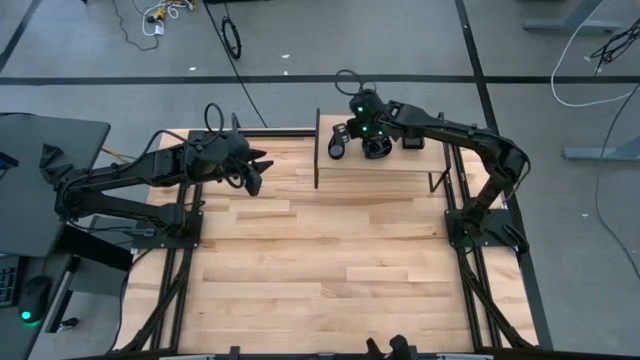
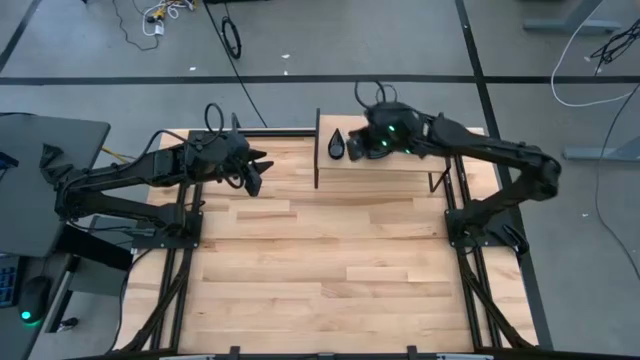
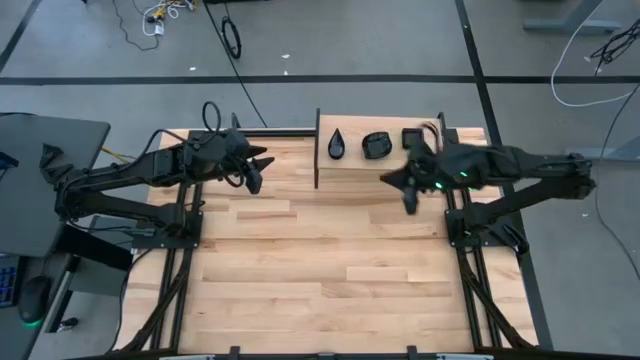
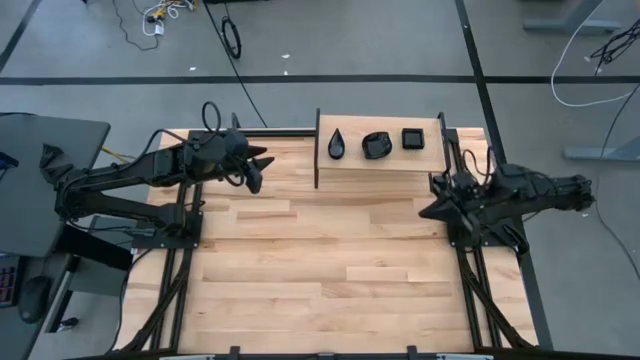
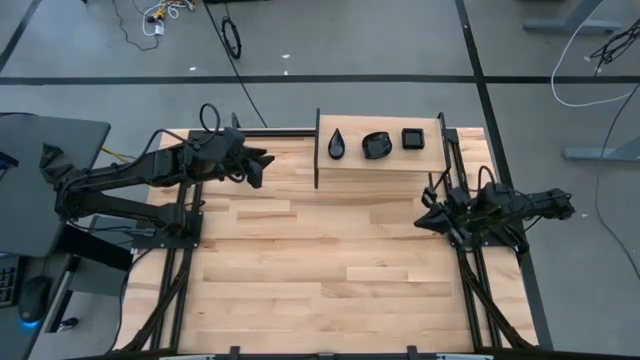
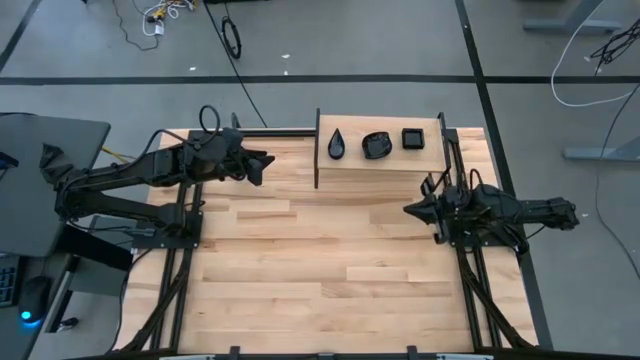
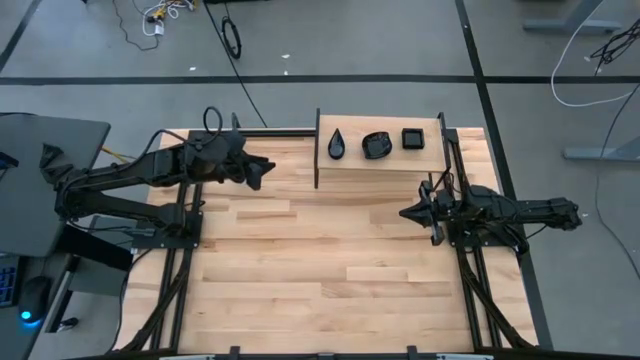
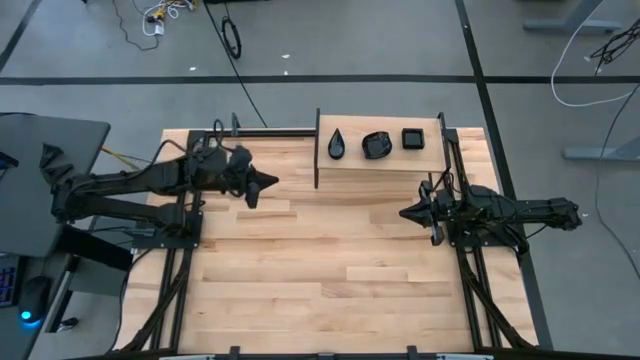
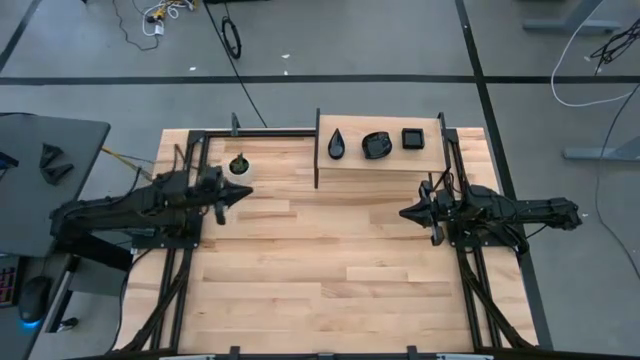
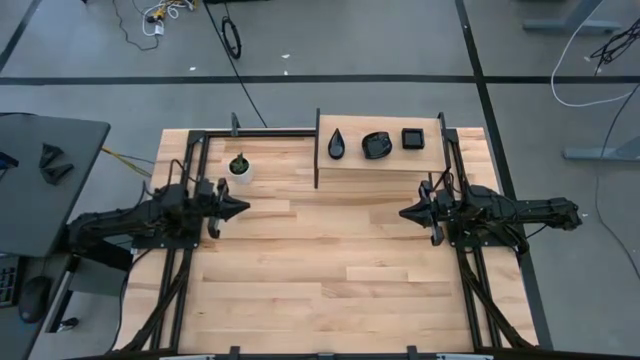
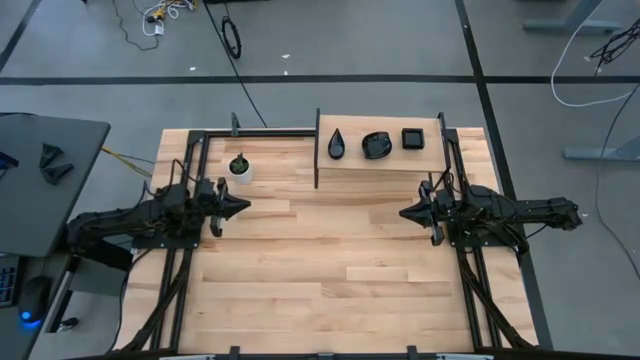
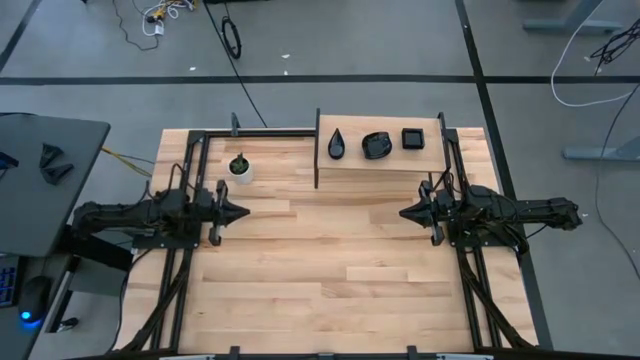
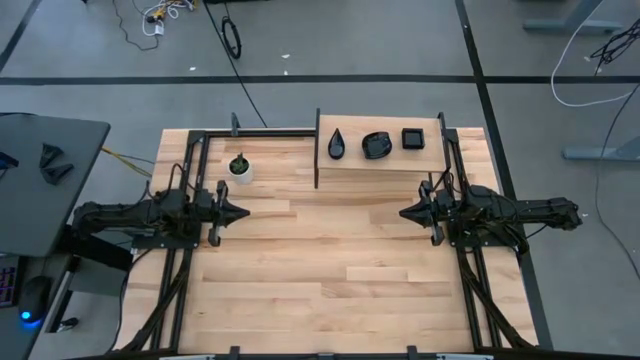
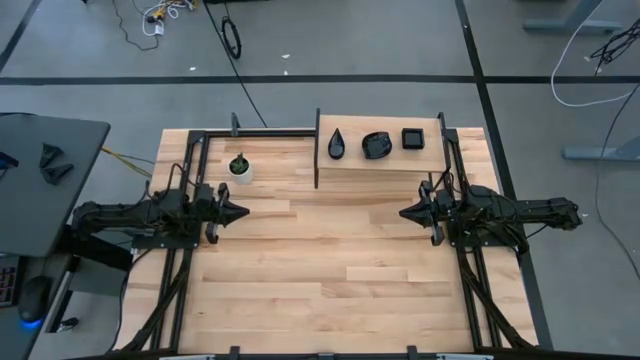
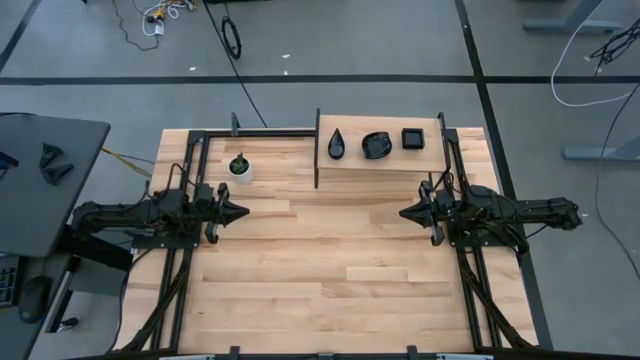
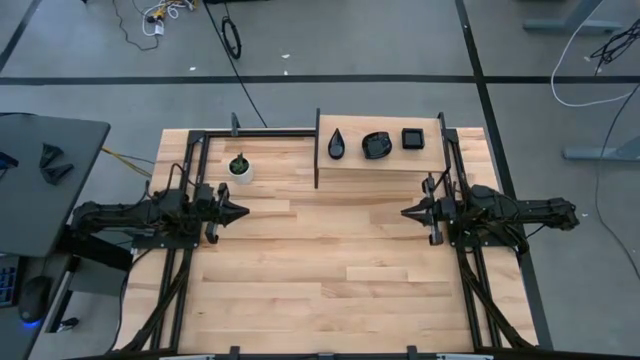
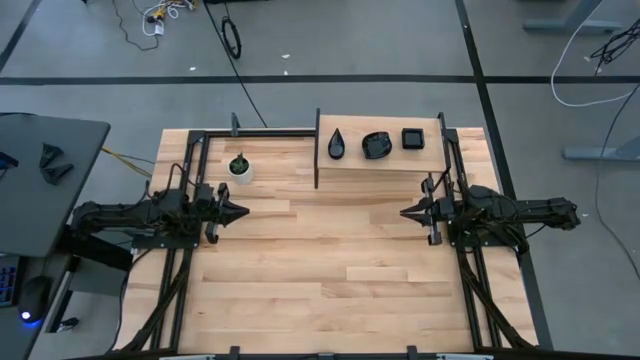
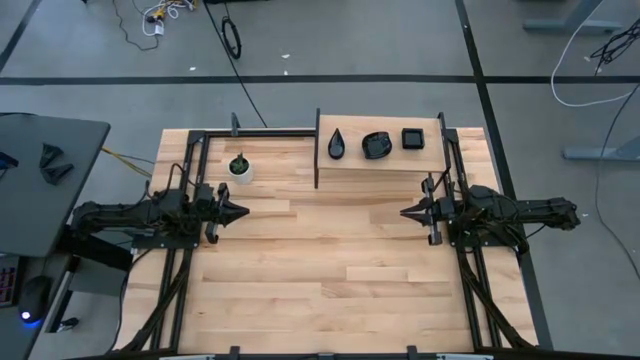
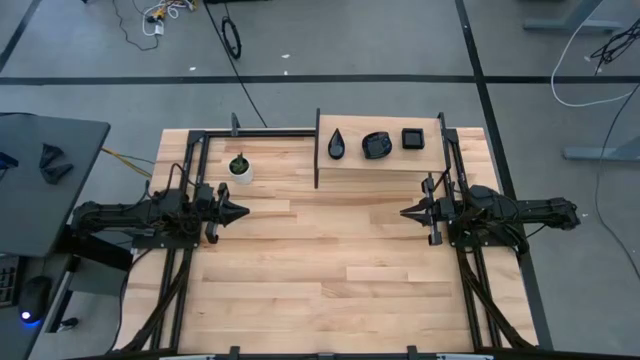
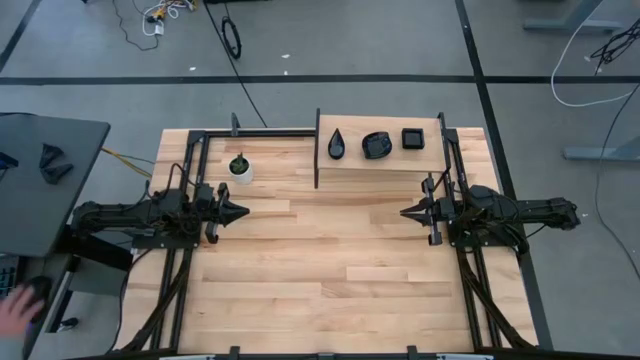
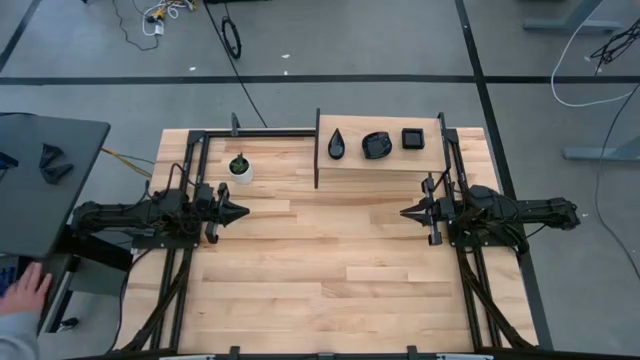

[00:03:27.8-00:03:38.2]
Task: Pick & Place Mini shaped plates
Return to Home Position

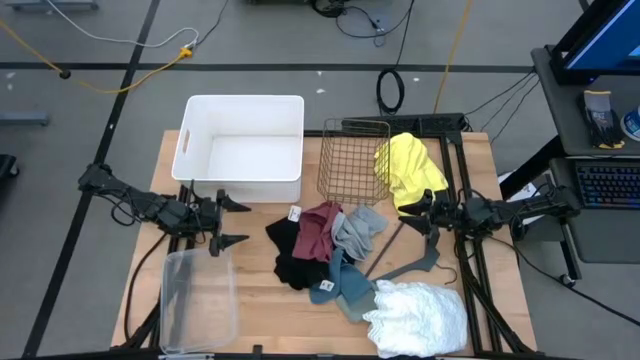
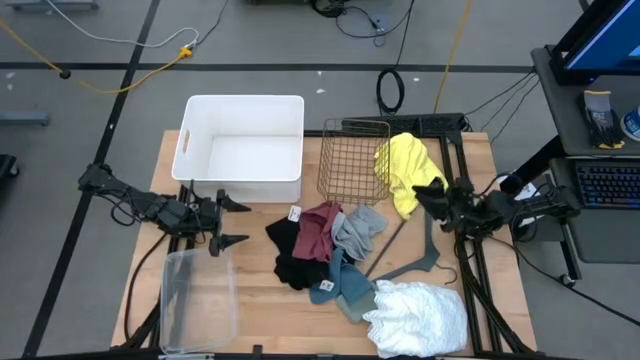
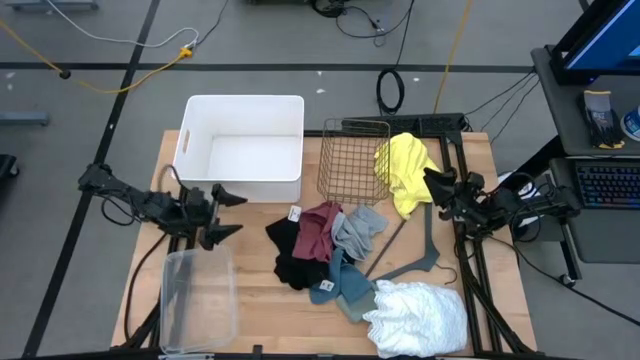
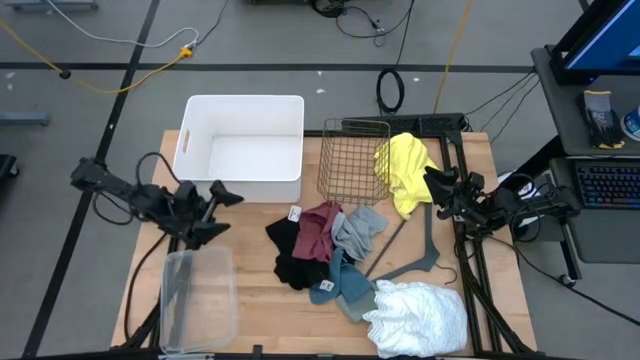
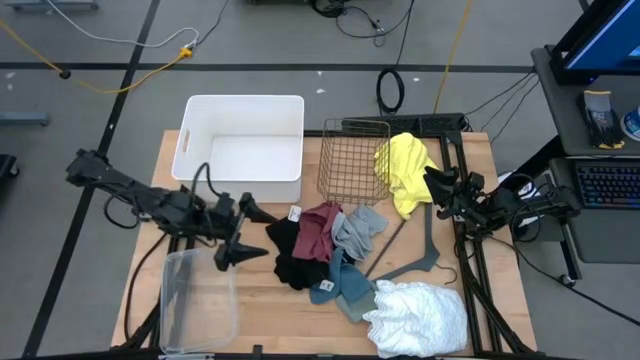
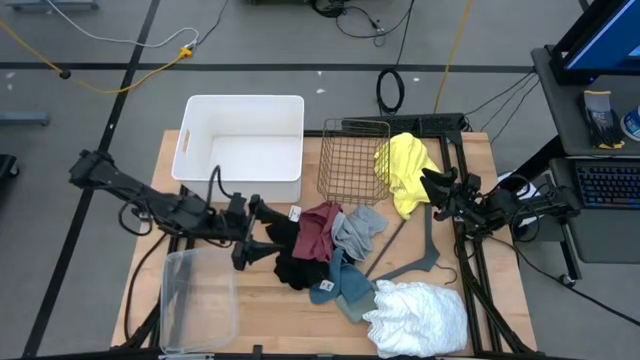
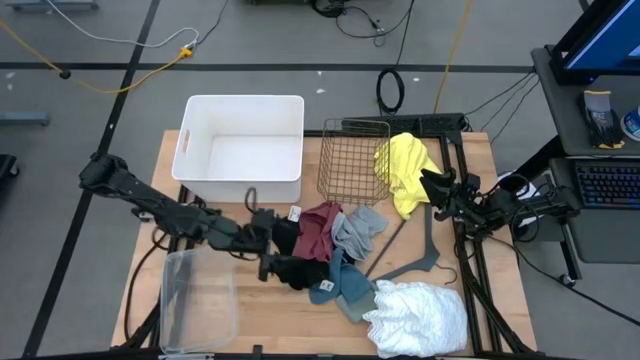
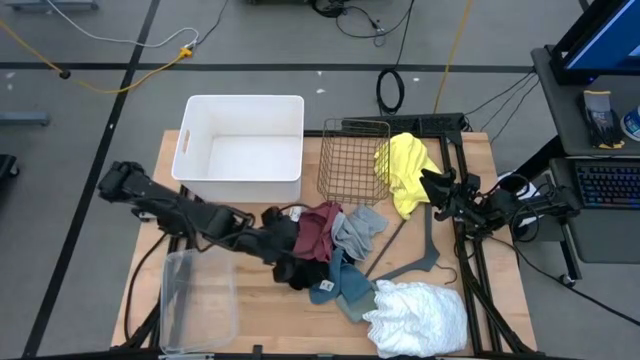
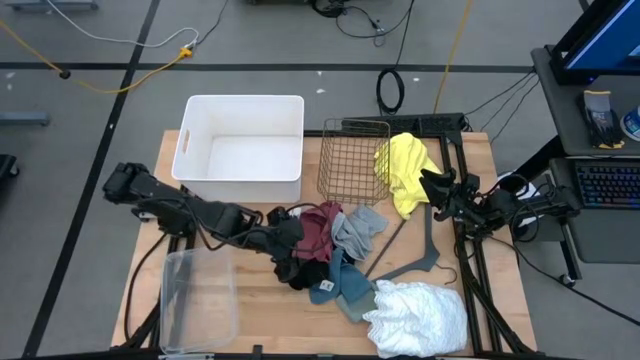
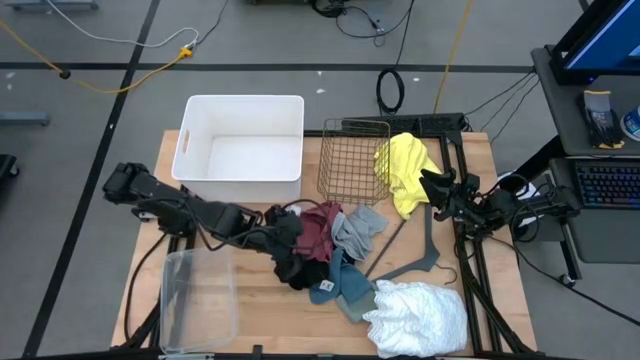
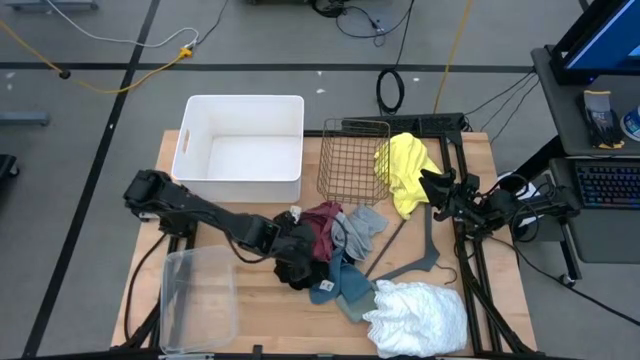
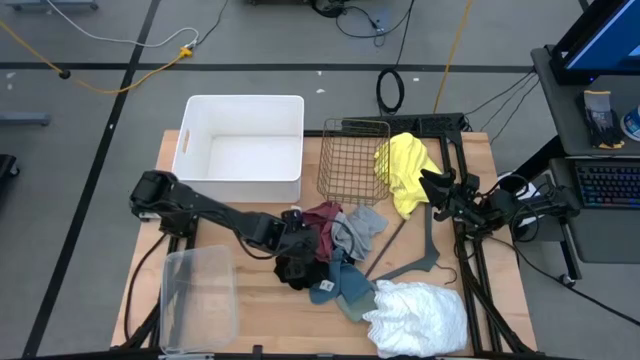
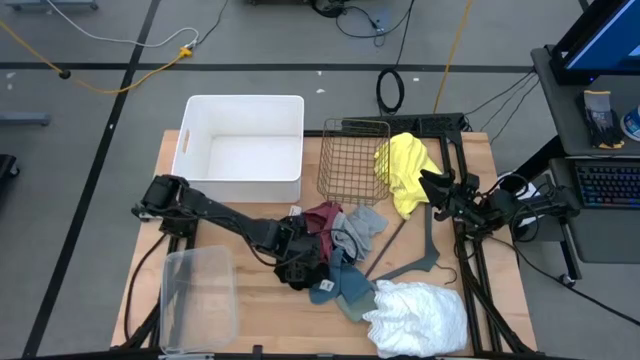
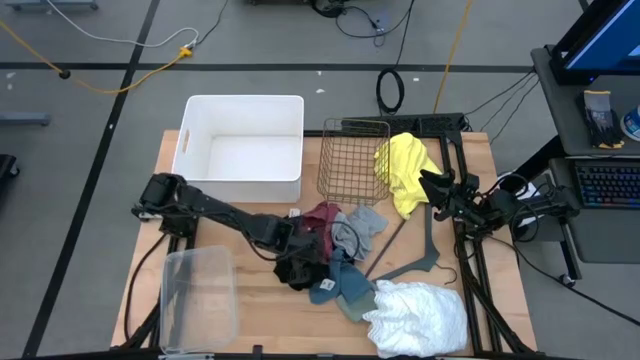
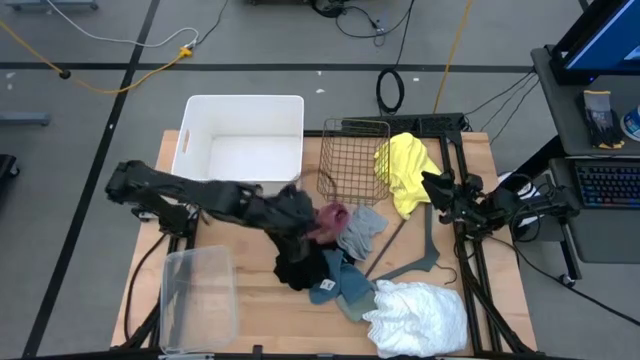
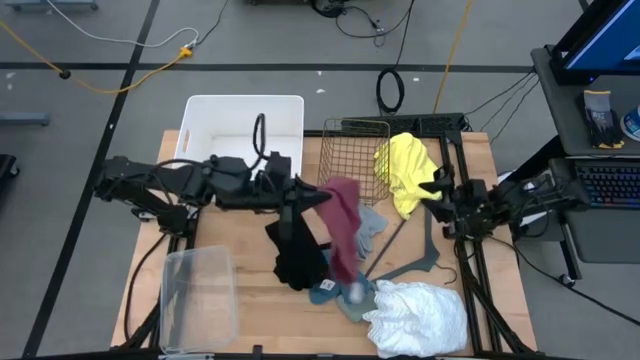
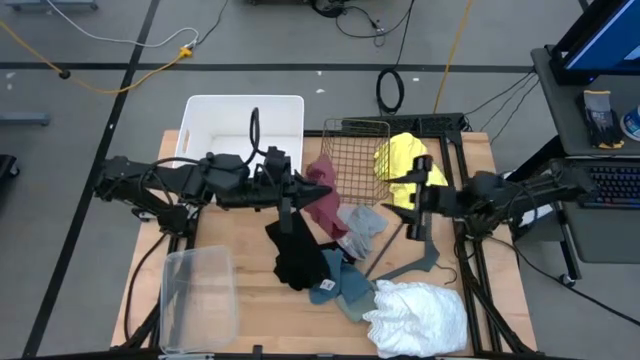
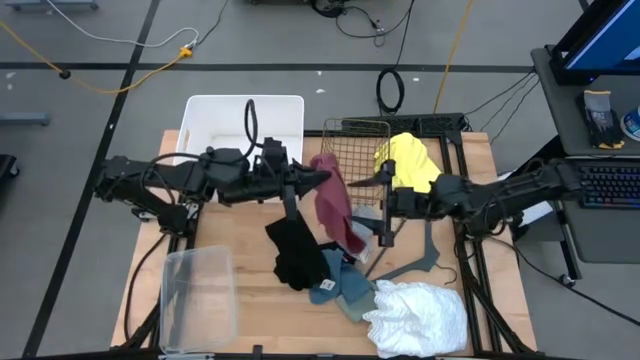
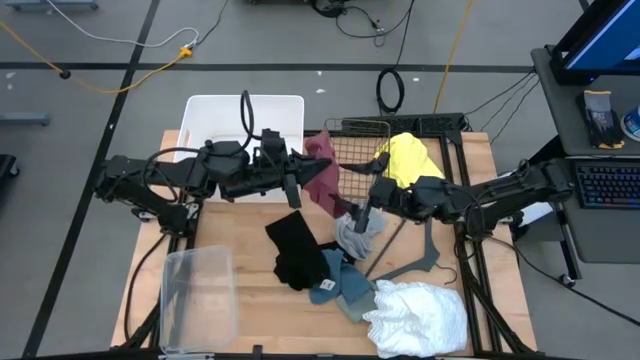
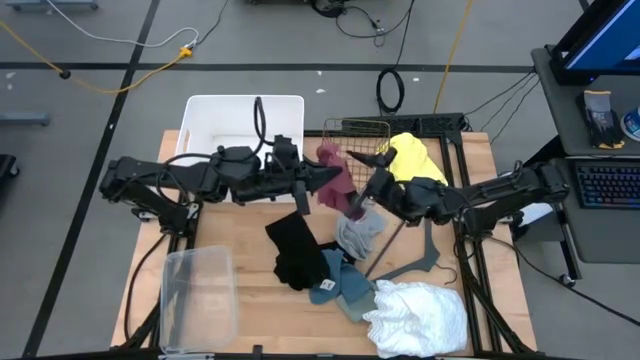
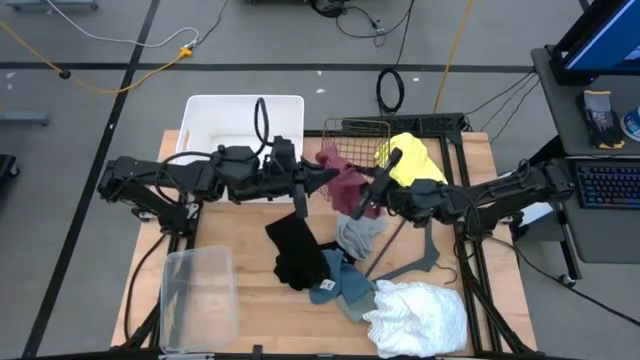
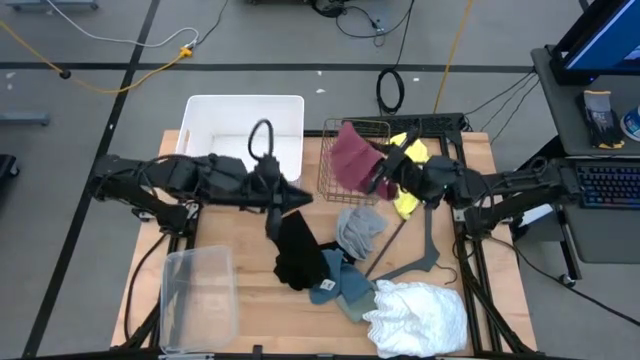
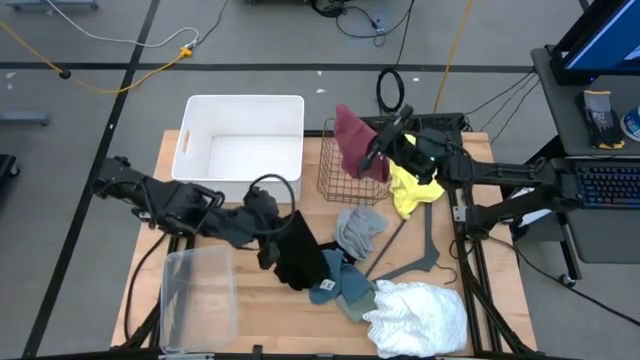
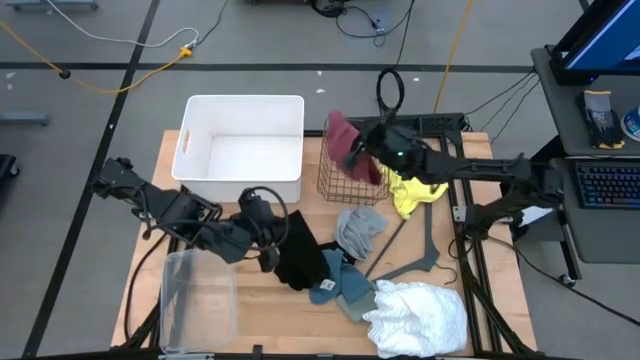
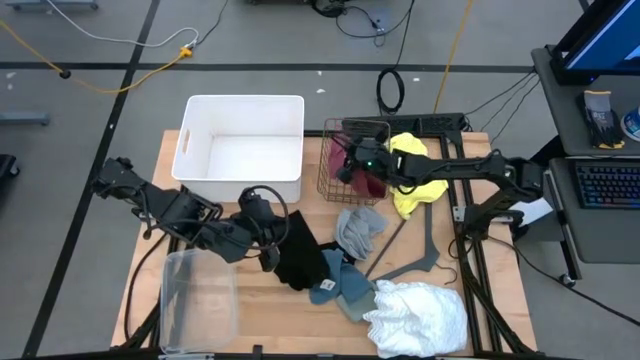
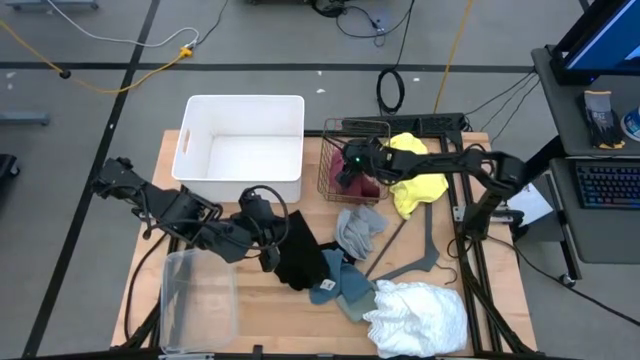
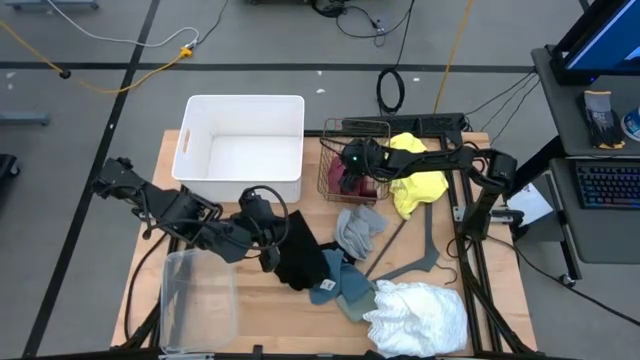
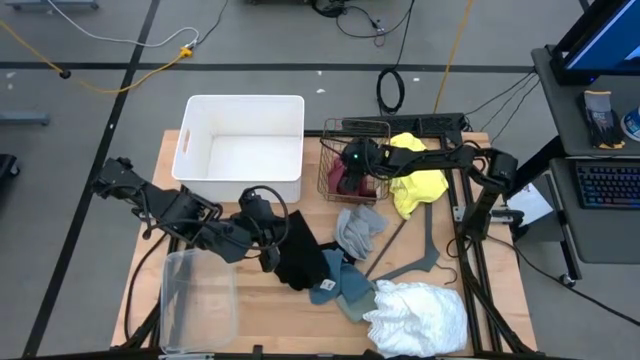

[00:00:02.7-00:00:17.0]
Task: Pick & Place Cloths
Put the red boxers into the gold wire basket
